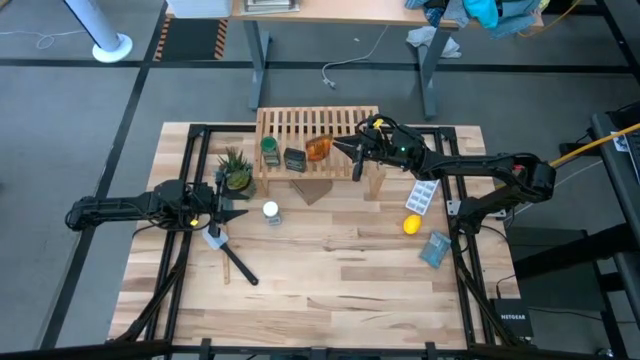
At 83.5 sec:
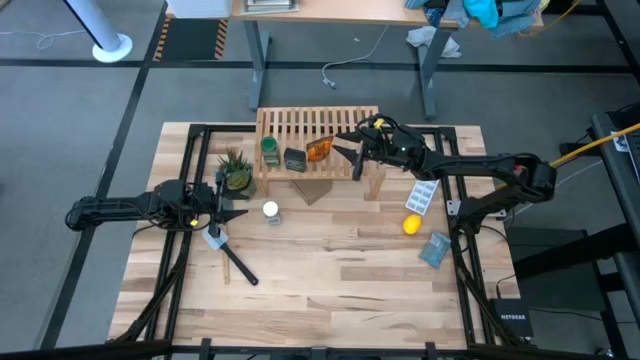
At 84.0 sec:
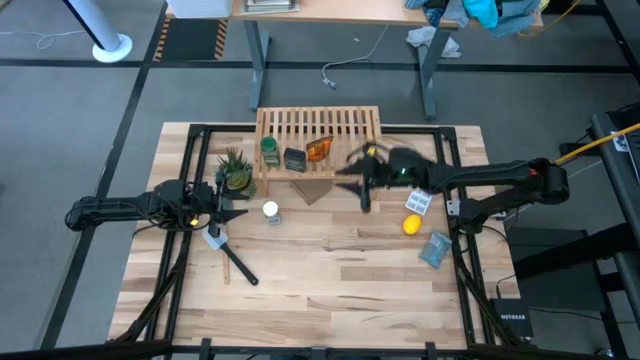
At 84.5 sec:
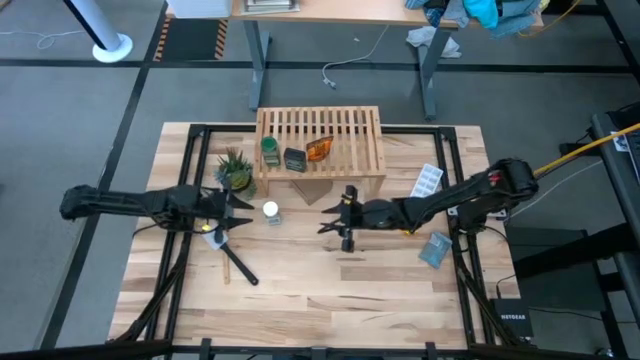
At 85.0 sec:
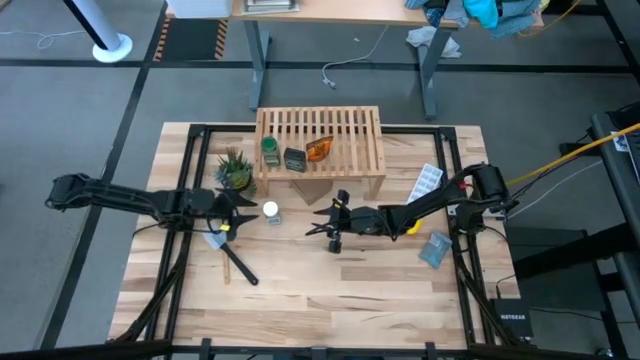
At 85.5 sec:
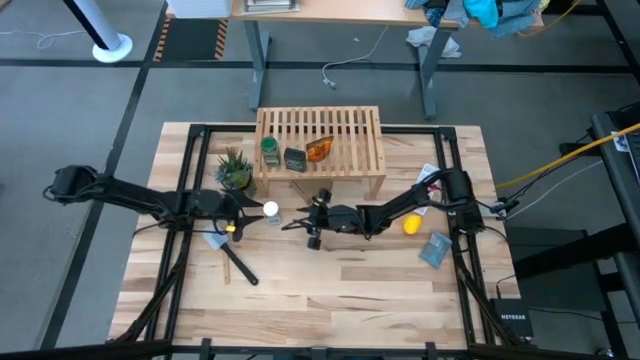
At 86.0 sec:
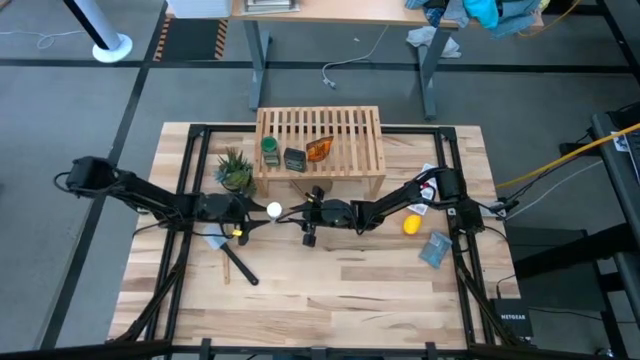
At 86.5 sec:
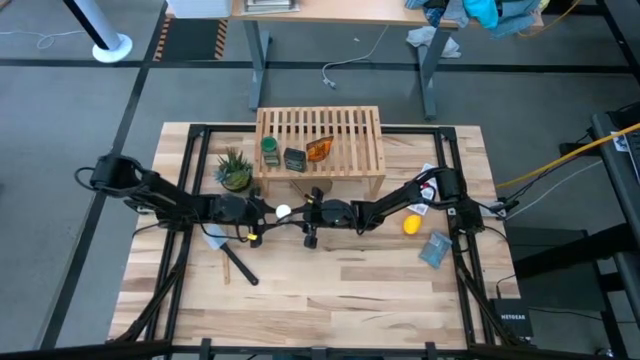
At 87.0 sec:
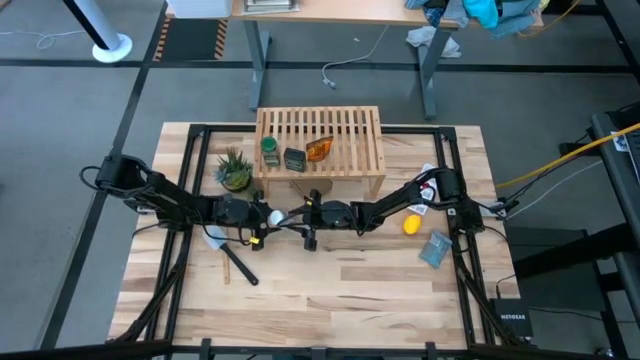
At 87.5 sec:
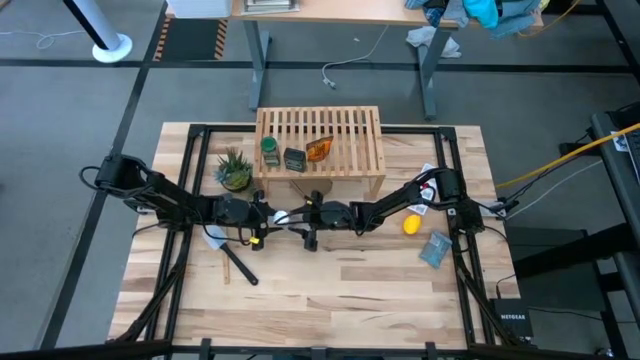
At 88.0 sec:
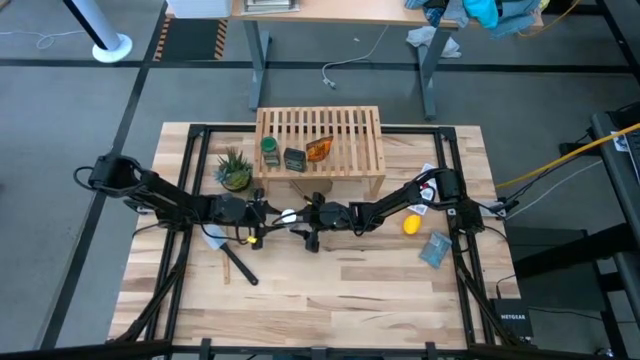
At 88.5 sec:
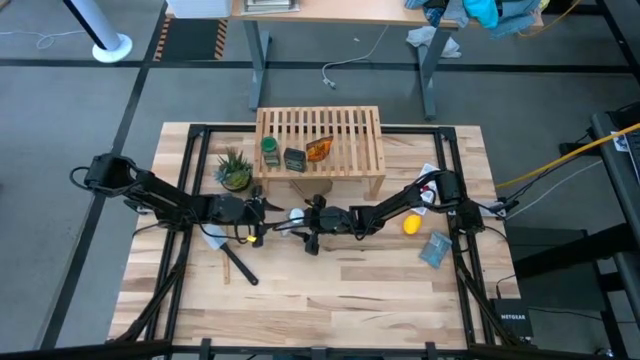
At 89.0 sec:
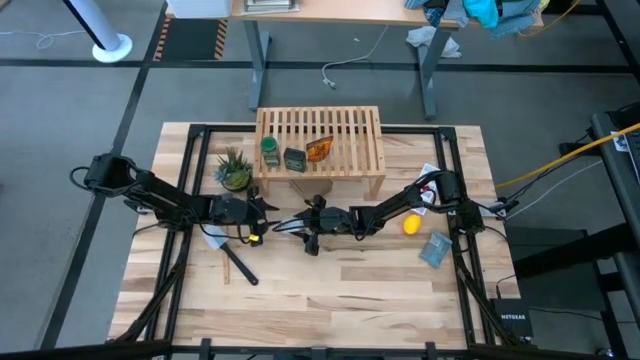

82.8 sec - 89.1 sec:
Task: Shelf spices
Put the white seasoning bottle on the shelf

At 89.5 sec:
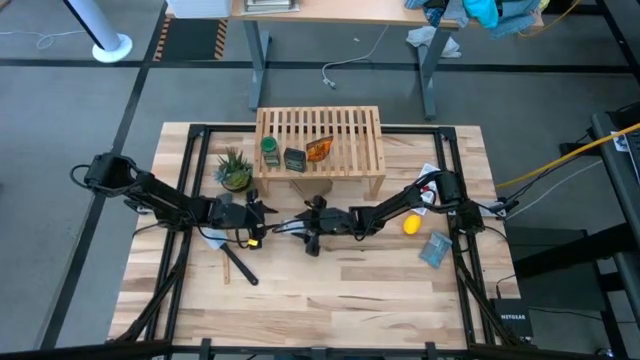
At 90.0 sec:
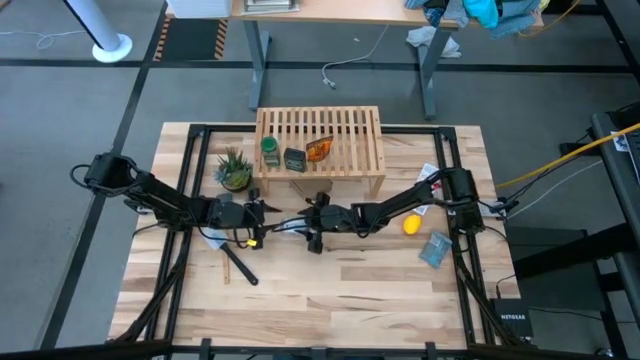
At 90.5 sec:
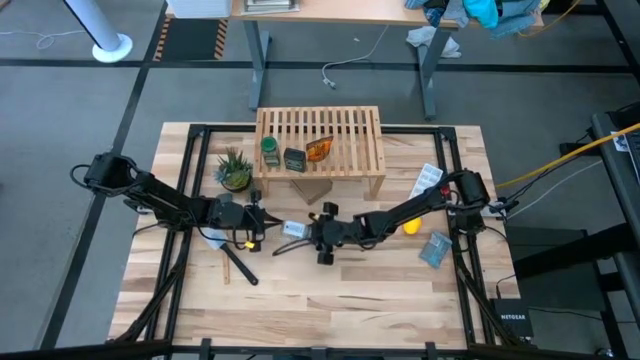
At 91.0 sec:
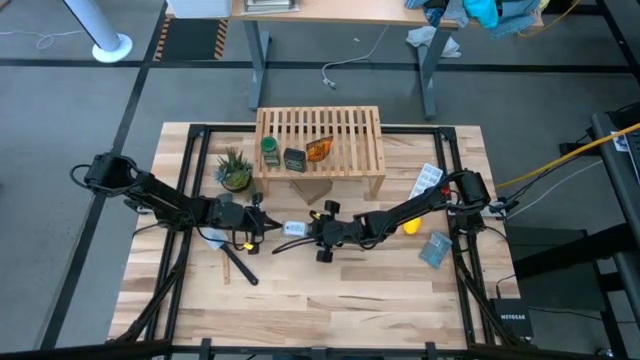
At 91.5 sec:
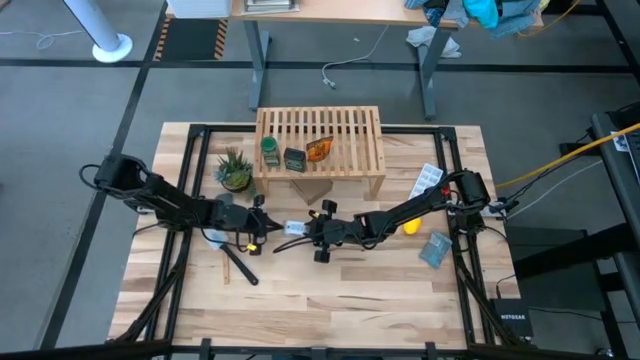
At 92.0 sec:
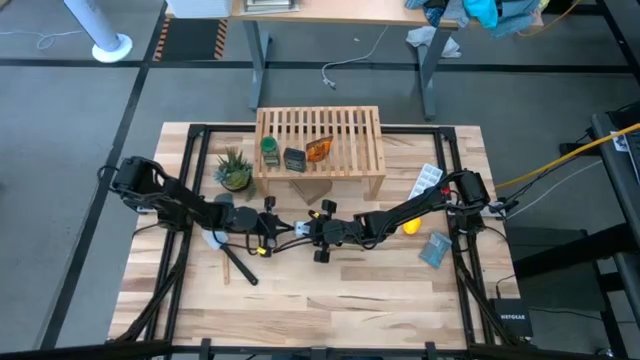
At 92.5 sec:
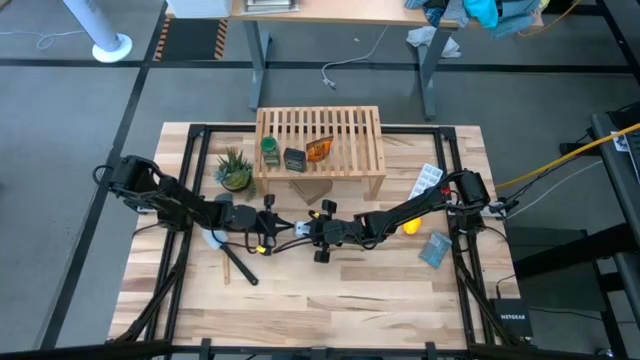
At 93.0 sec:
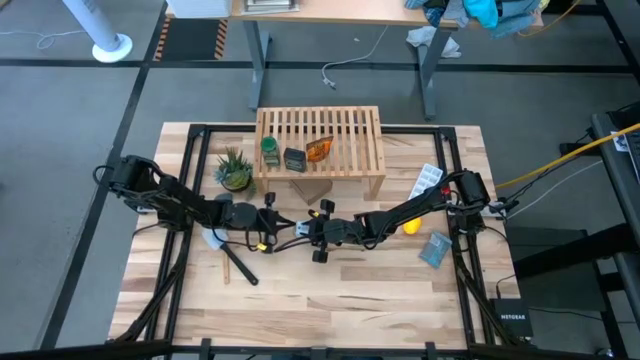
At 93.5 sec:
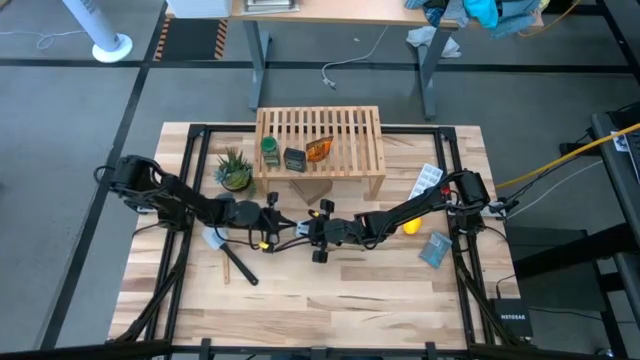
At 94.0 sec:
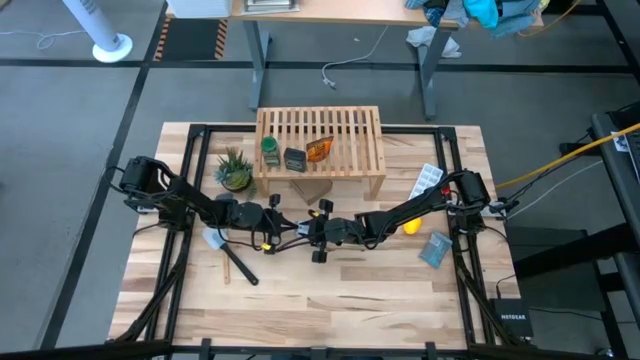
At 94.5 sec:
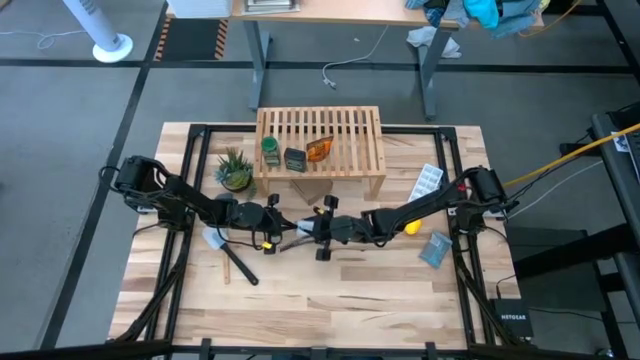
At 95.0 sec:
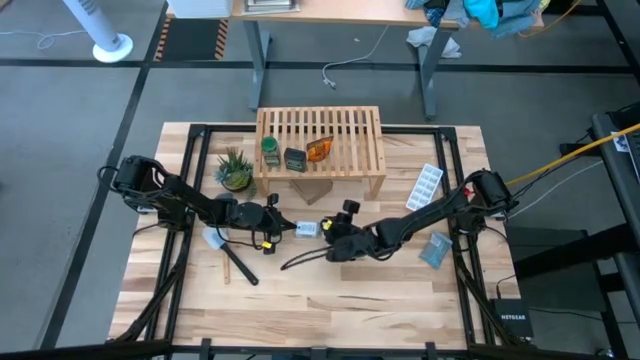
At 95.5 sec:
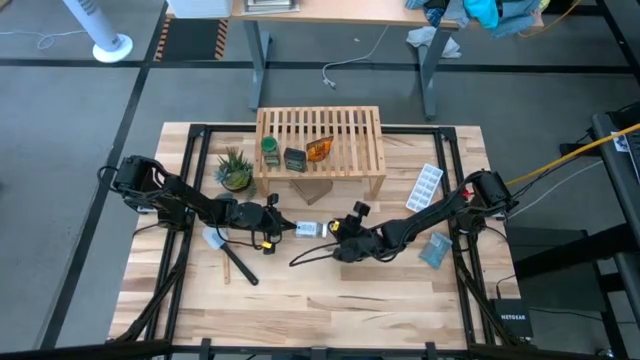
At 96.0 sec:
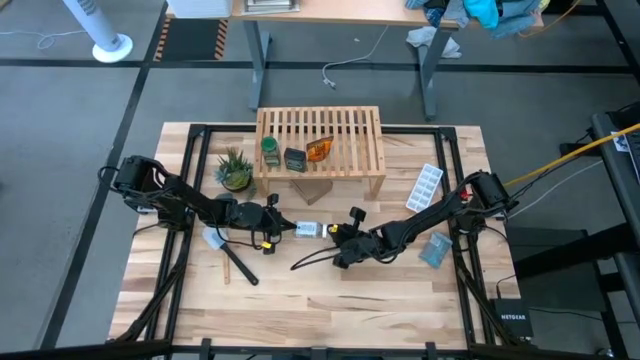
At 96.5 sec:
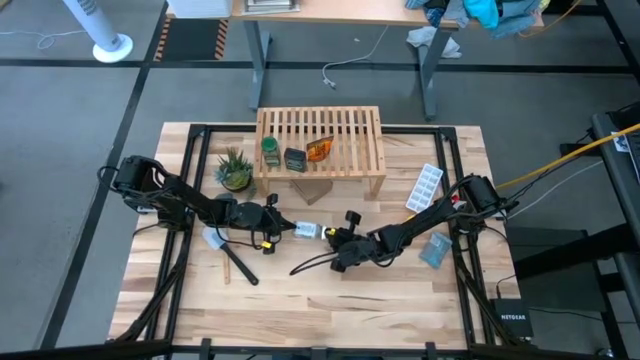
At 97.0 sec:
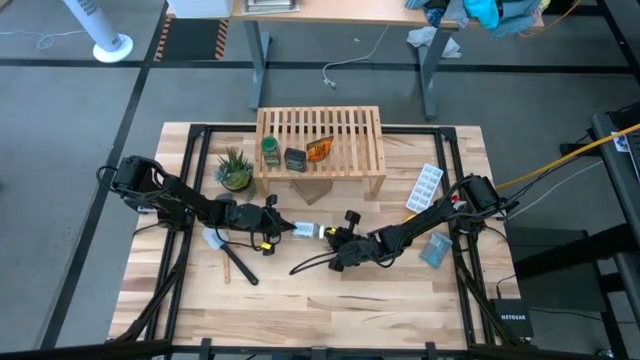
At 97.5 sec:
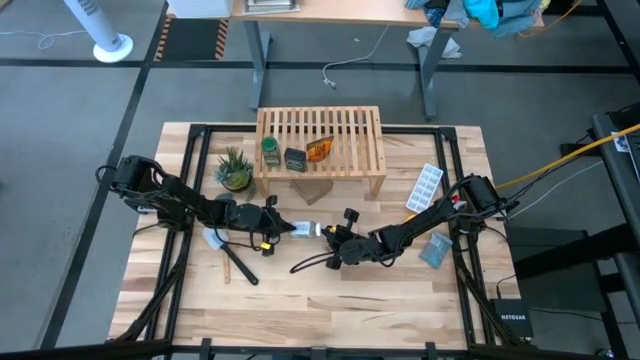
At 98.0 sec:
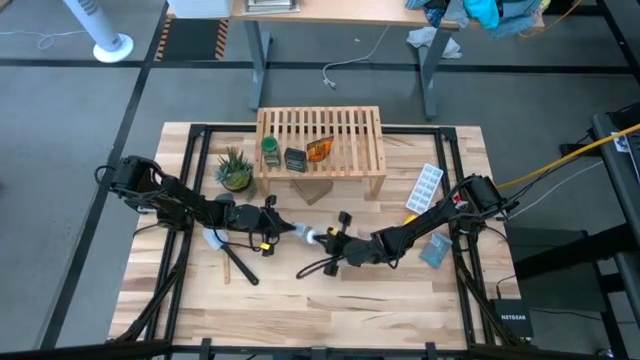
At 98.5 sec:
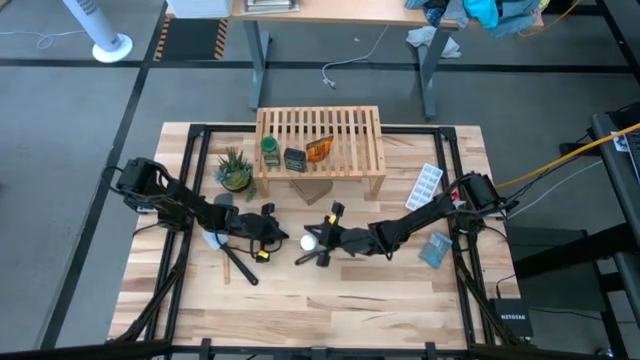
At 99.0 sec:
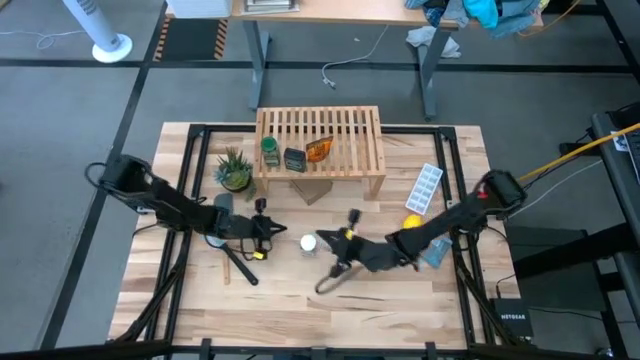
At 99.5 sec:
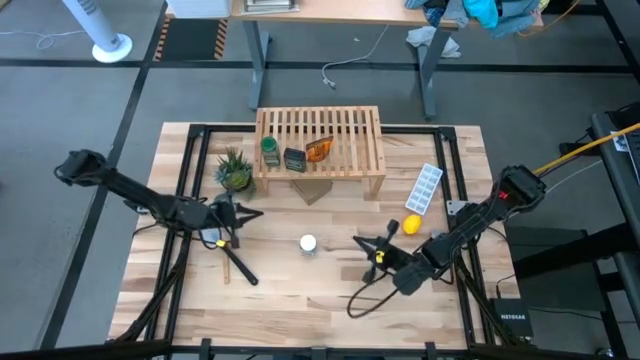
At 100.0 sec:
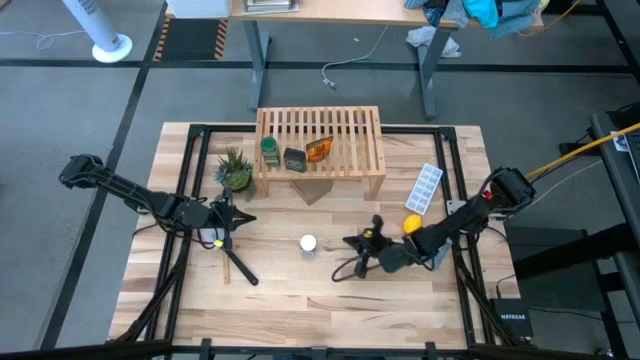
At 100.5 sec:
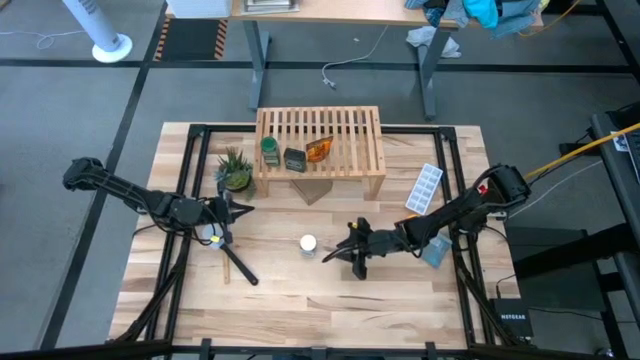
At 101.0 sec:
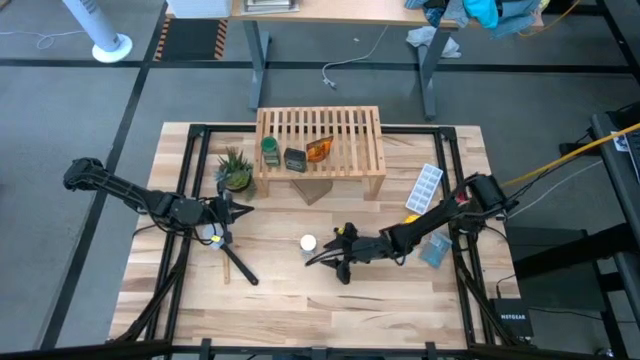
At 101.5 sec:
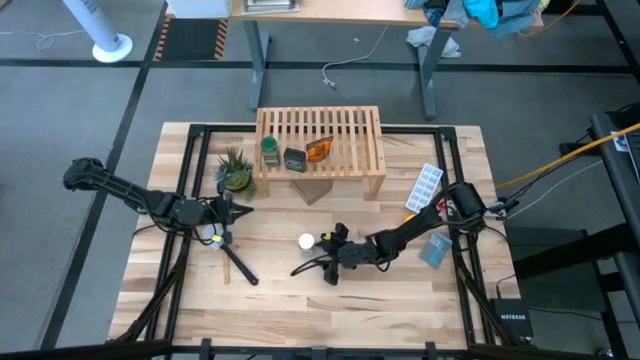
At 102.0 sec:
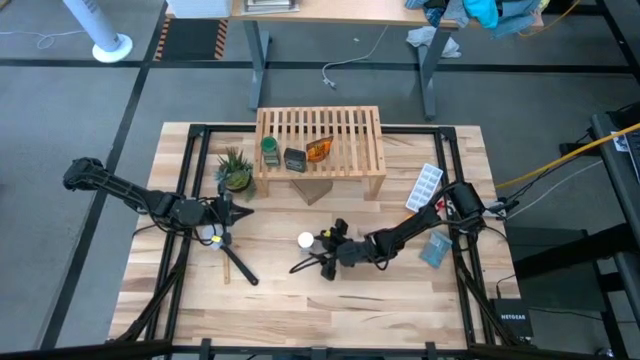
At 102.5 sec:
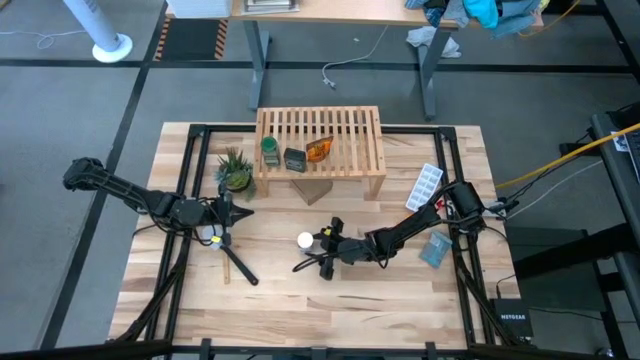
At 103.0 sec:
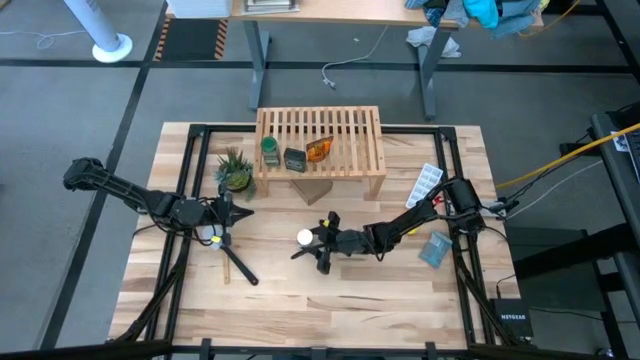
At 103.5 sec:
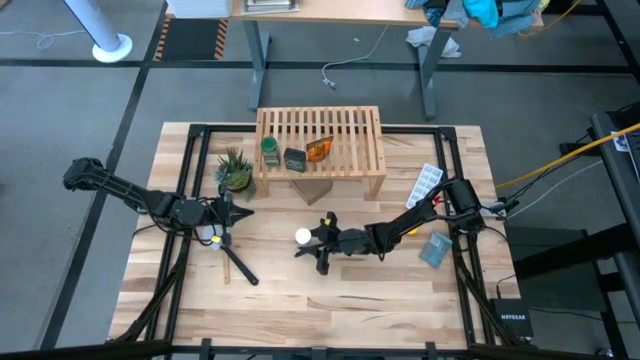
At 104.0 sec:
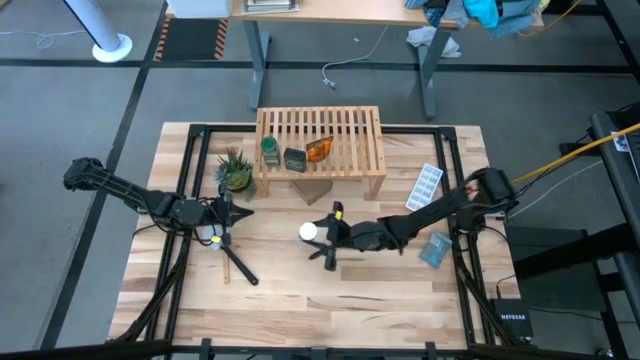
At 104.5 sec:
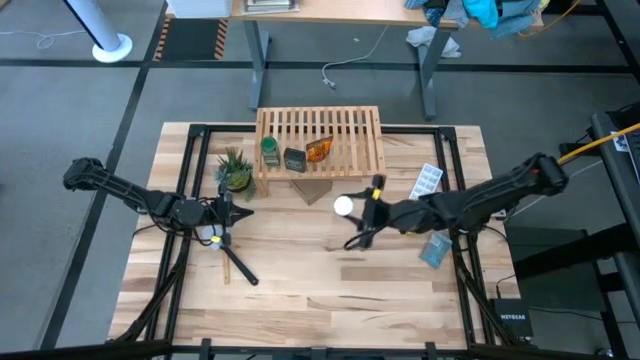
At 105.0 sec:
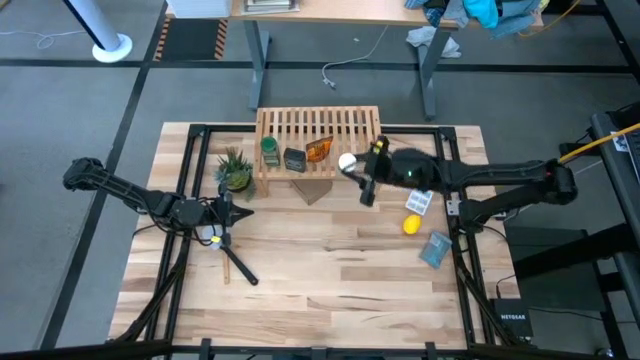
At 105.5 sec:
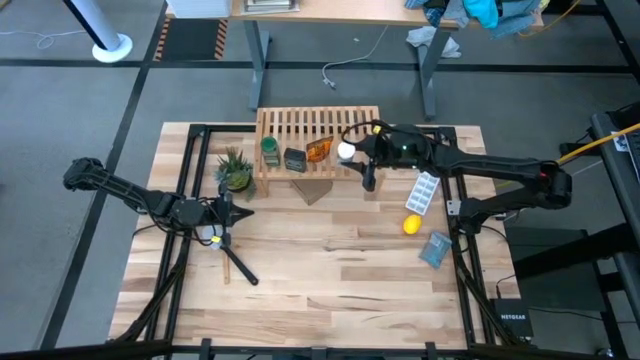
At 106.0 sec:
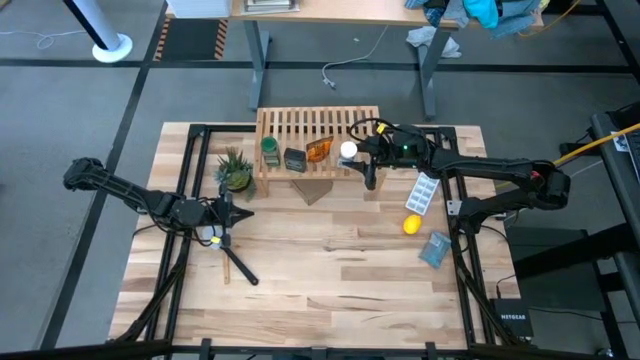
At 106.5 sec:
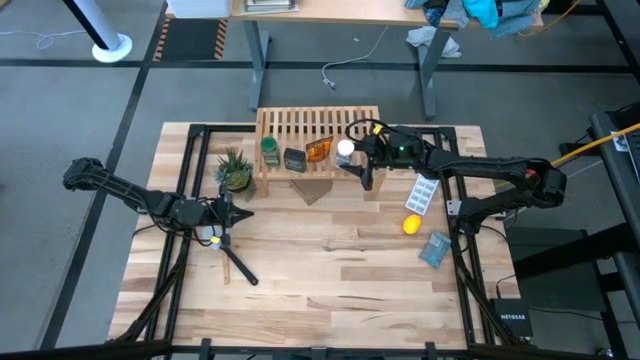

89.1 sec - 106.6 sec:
Put the white seasoning bottle on the shelf
